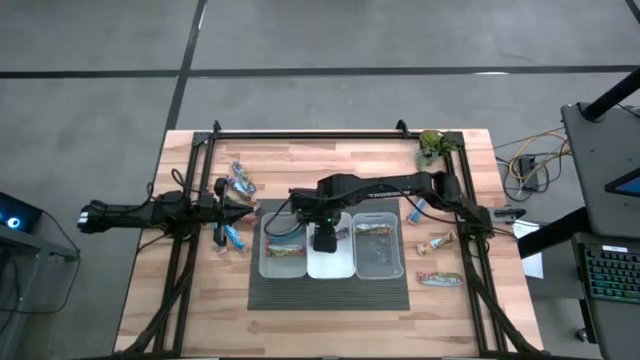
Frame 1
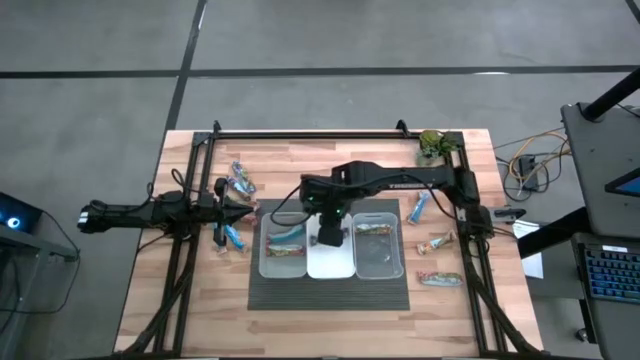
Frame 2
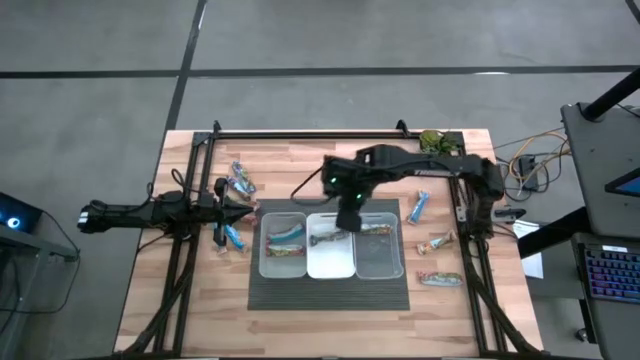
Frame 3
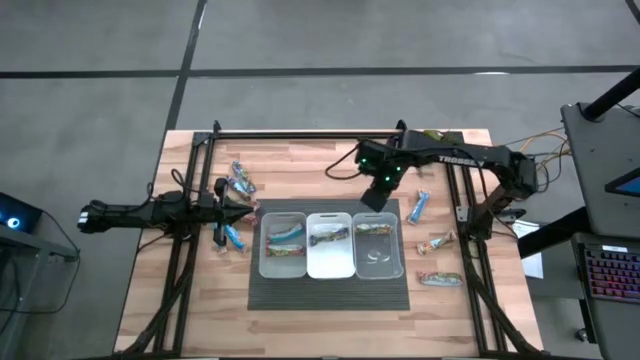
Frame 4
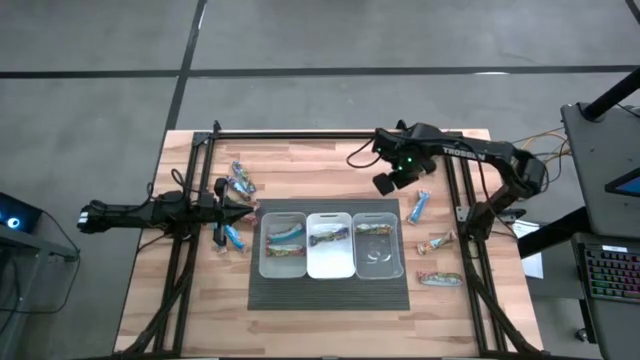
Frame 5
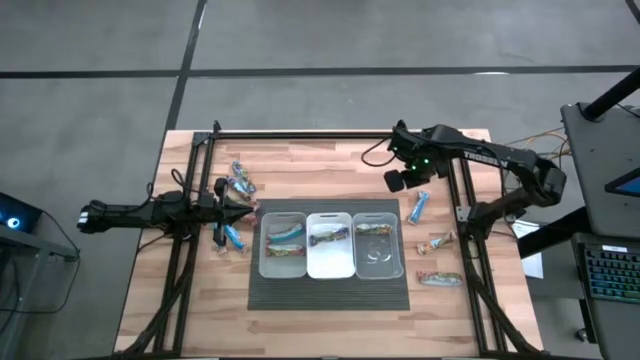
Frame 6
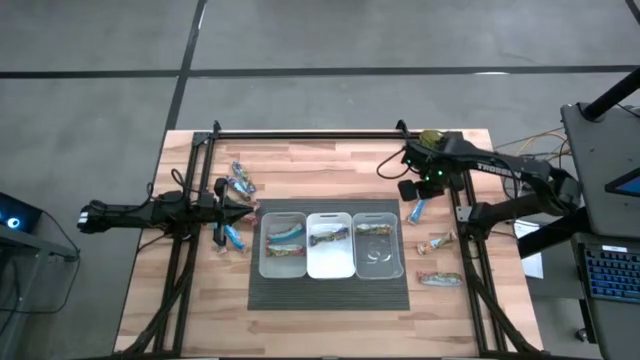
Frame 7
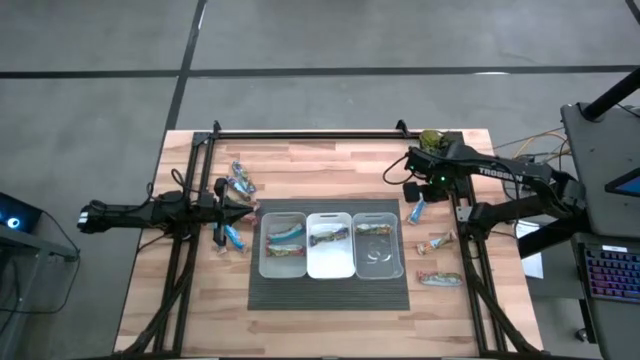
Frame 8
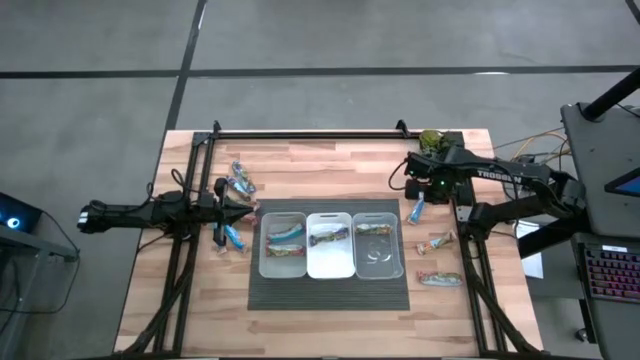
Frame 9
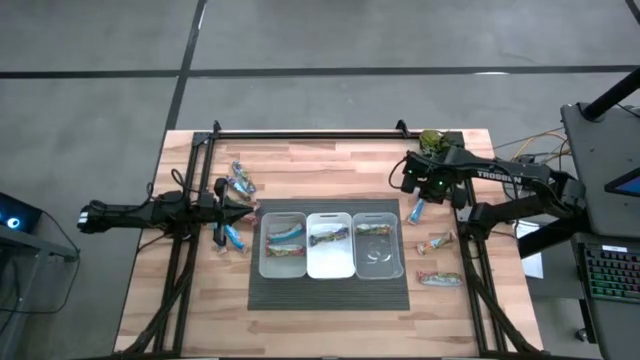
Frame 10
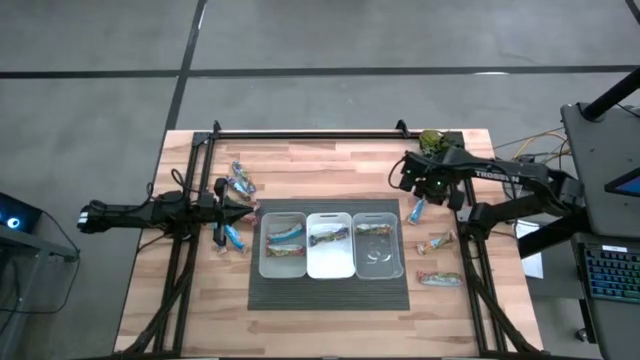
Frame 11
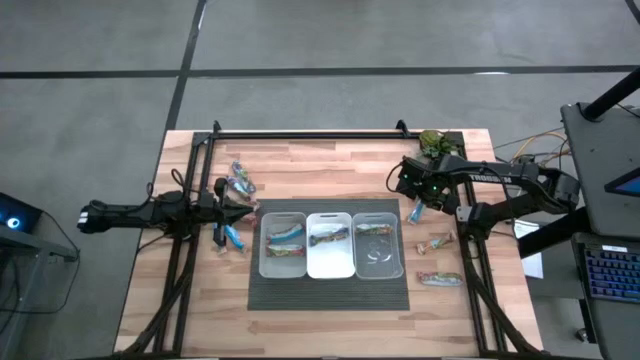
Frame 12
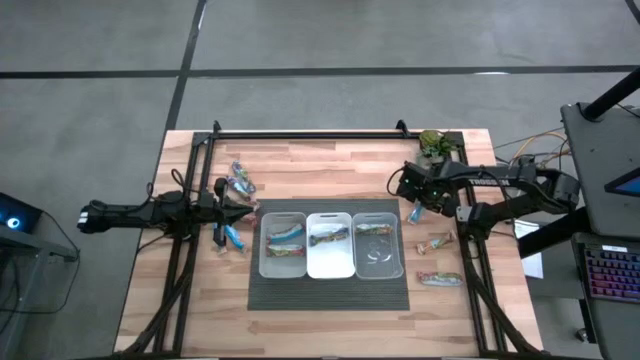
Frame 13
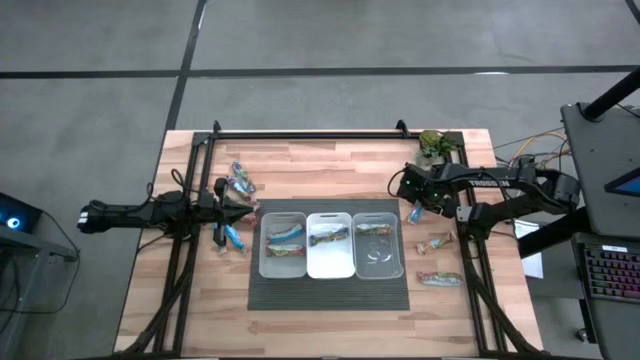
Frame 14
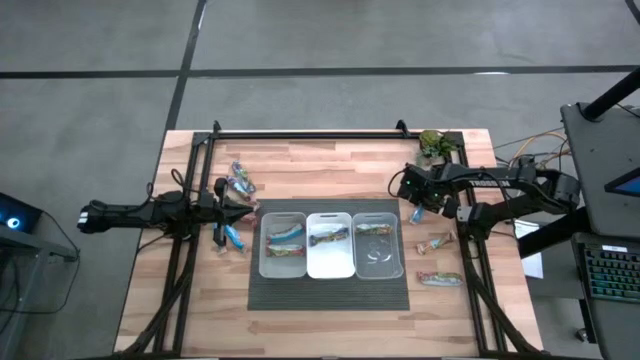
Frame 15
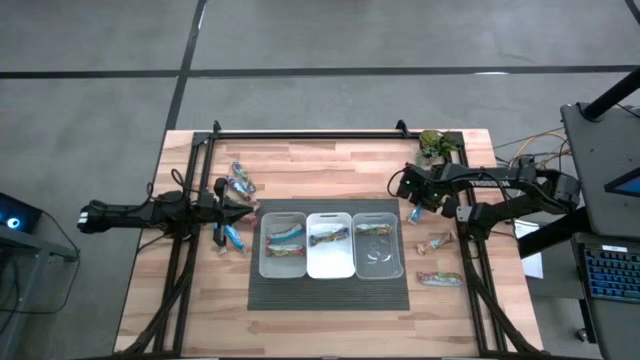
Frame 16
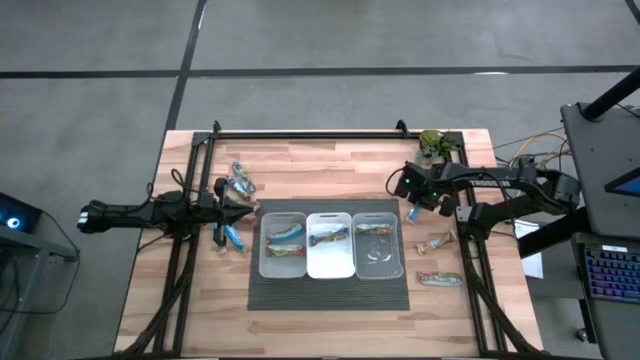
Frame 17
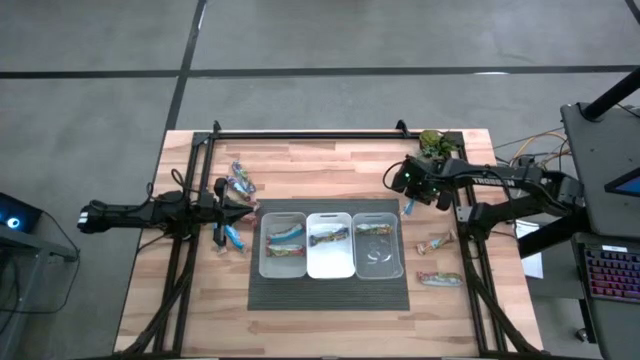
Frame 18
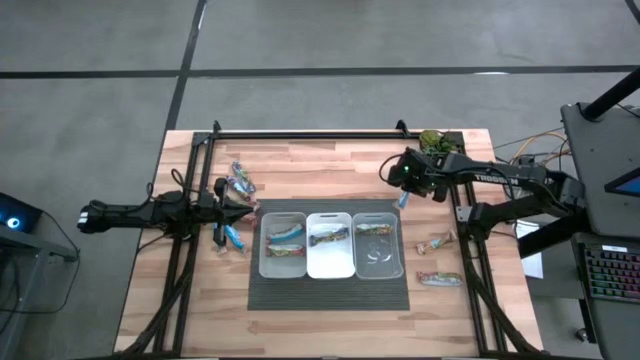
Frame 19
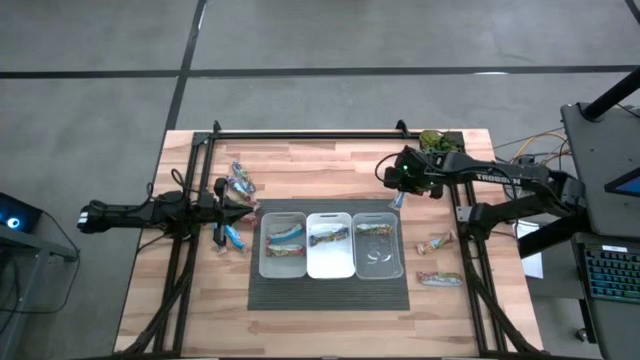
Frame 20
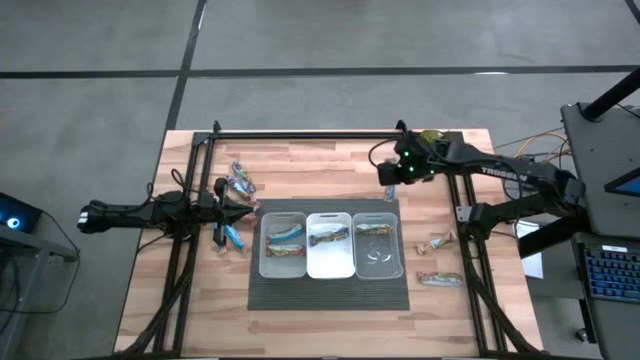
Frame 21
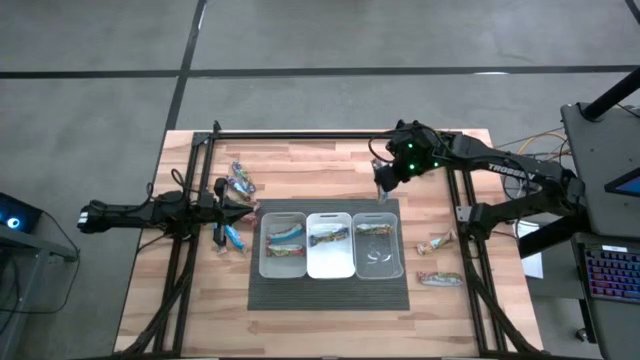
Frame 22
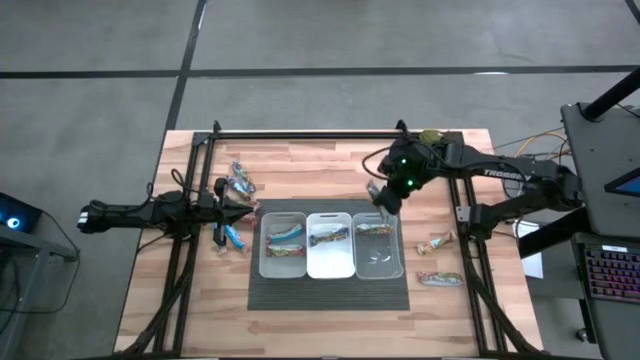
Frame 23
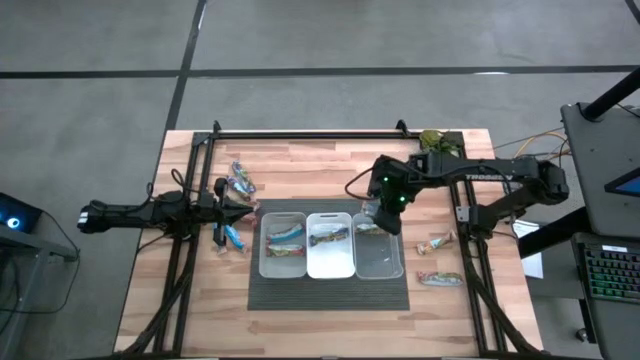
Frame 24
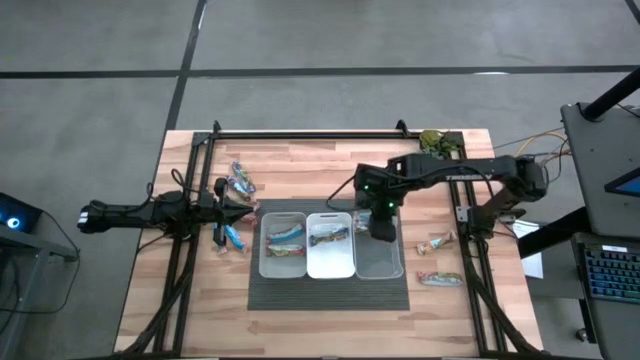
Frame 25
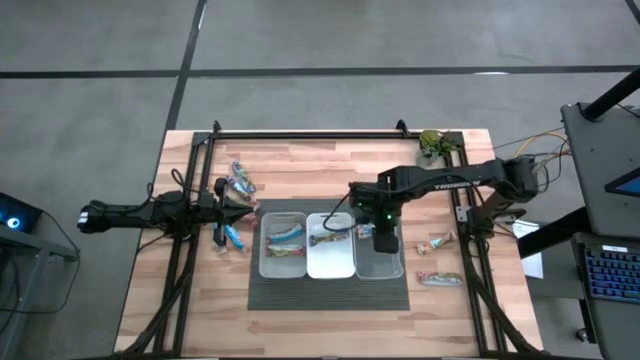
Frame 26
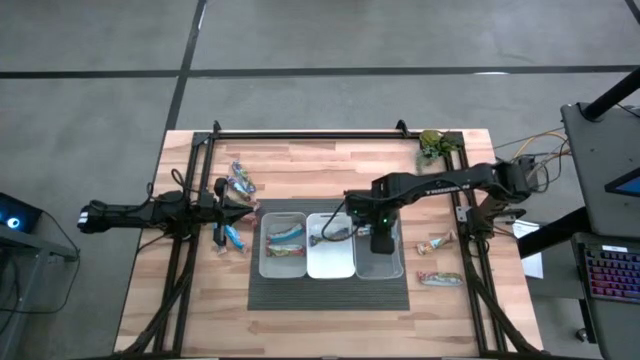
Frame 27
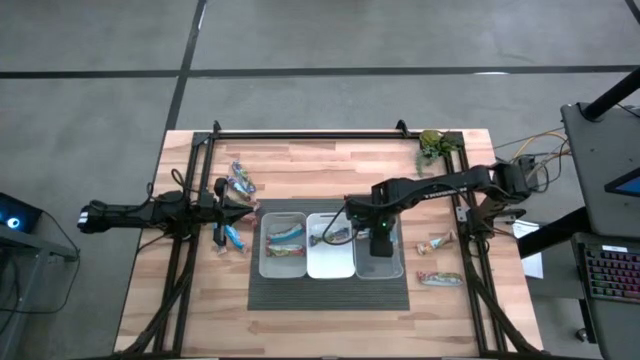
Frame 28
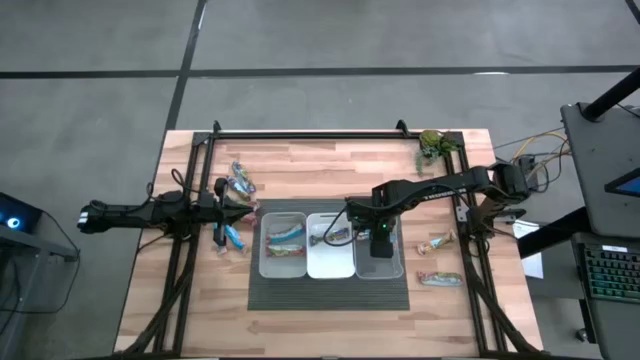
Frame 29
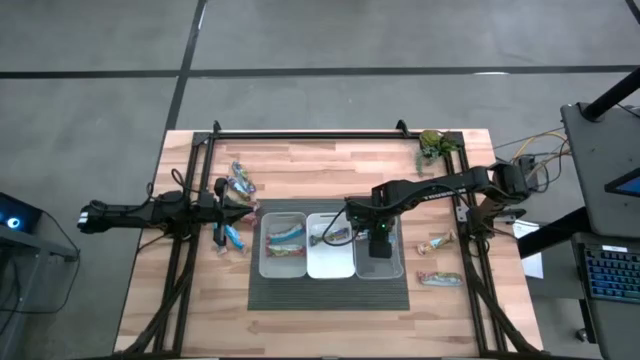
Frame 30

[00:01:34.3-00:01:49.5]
Task: Pick and place Granola Bars by type
Put the yellow granola bar into the transparent bin

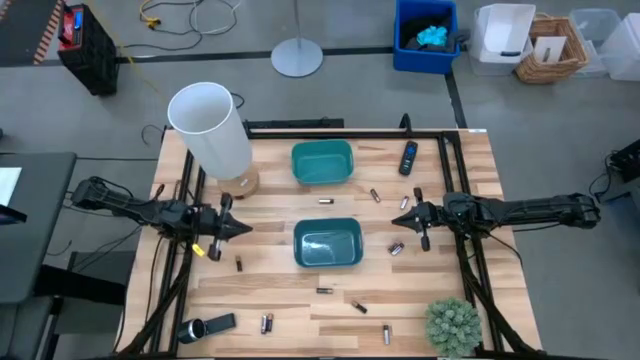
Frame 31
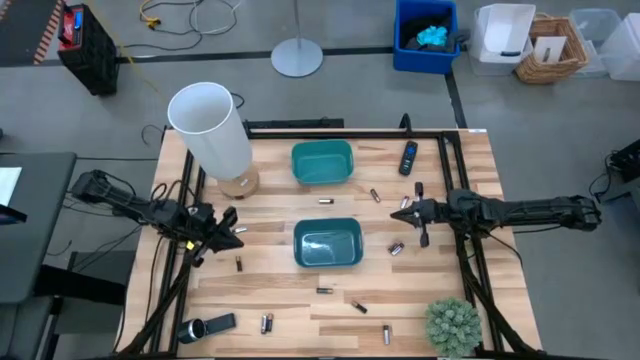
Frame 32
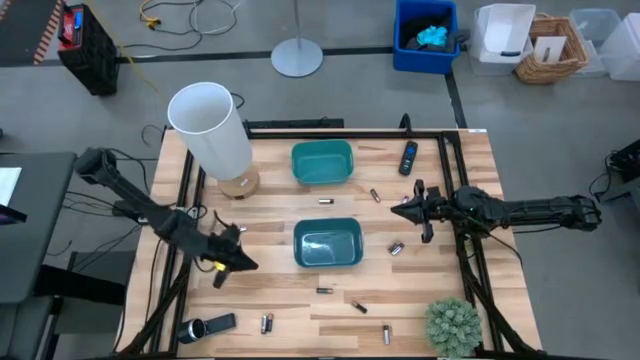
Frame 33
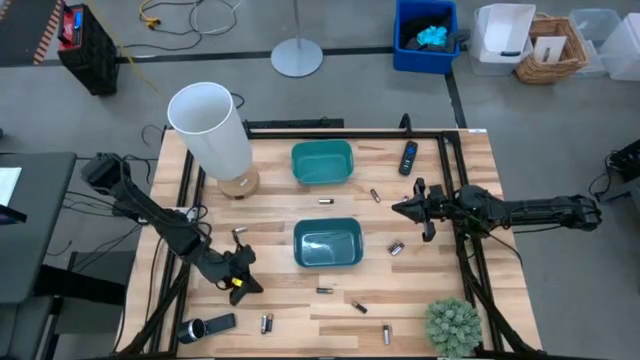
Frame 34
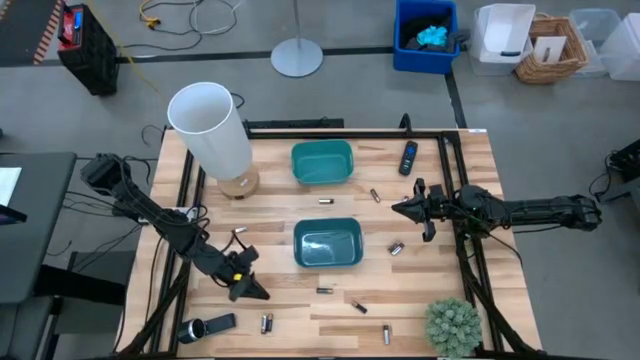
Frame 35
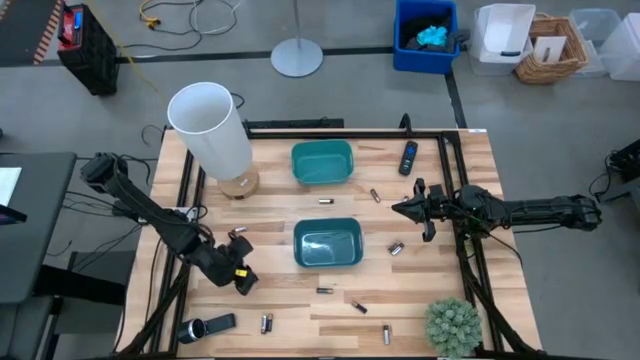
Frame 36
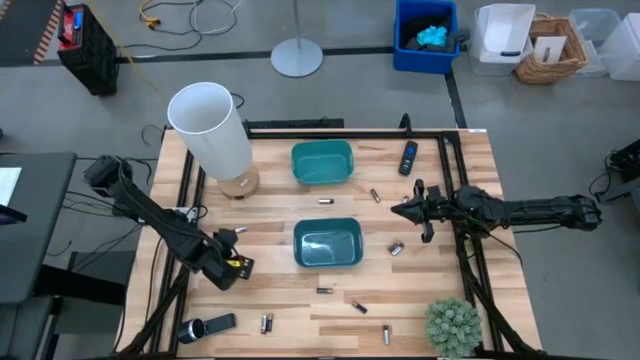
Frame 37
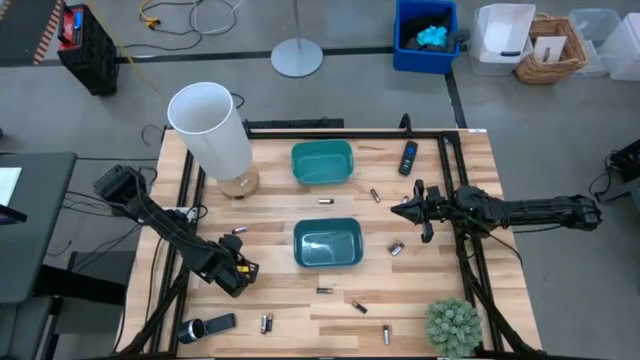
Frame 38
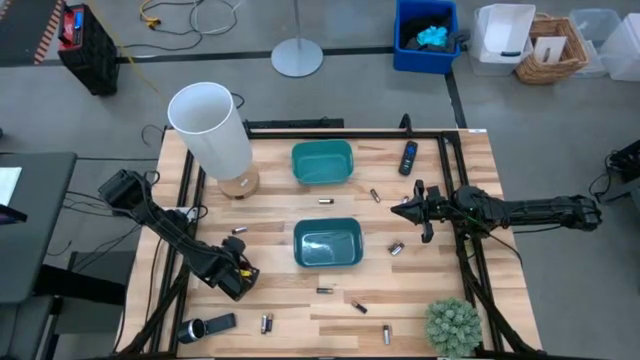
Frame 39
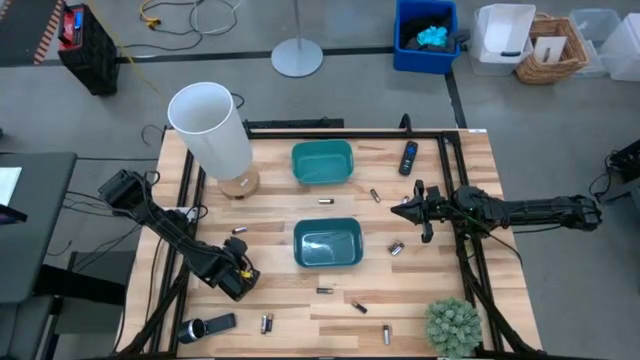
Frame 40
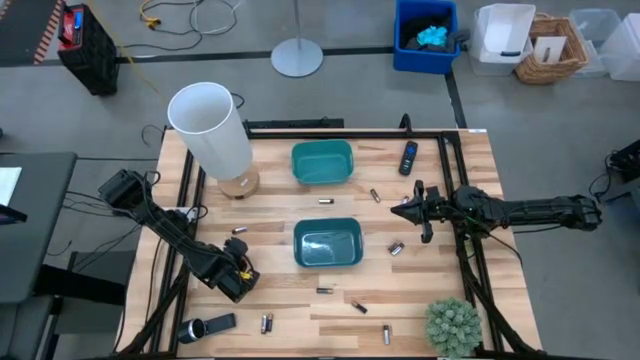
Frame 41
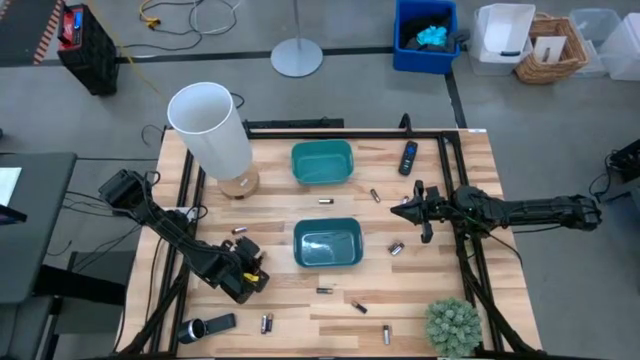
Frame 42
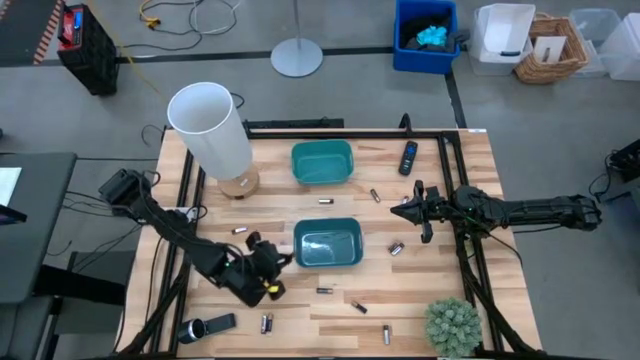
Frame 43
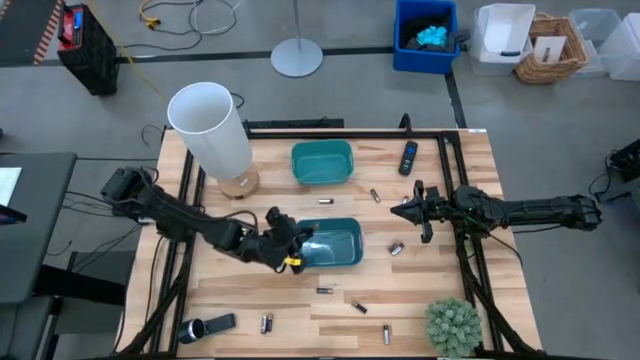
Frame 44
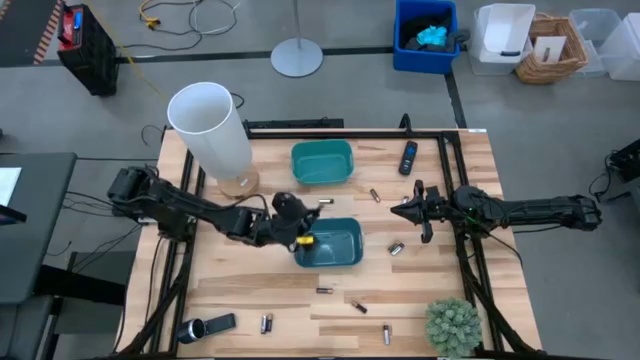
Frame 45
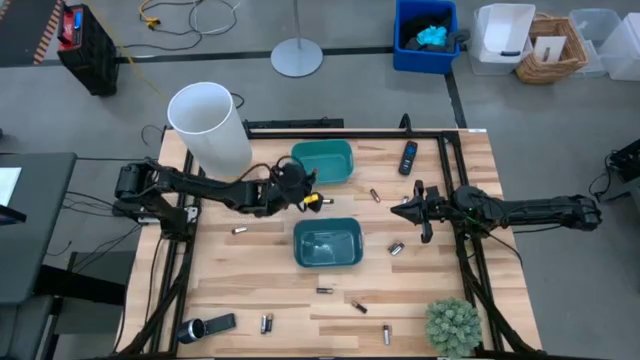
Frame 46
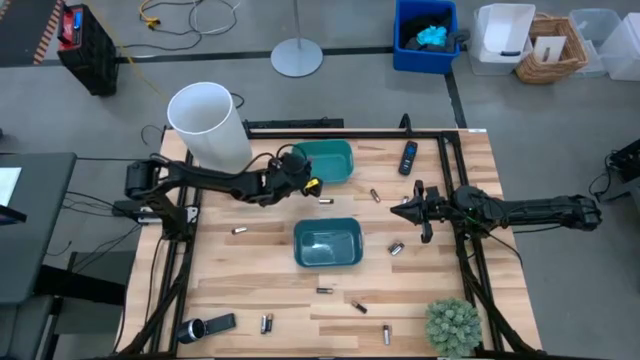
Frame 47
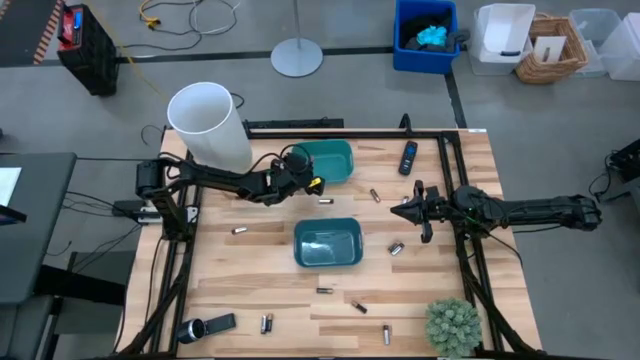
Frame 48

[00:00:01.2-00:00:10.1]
Task: Sort batteries
Put the black battery into the green bin
